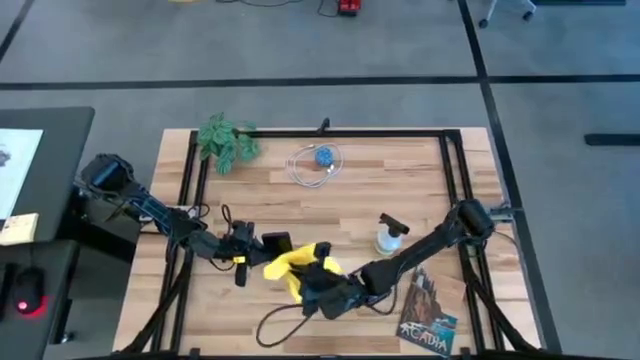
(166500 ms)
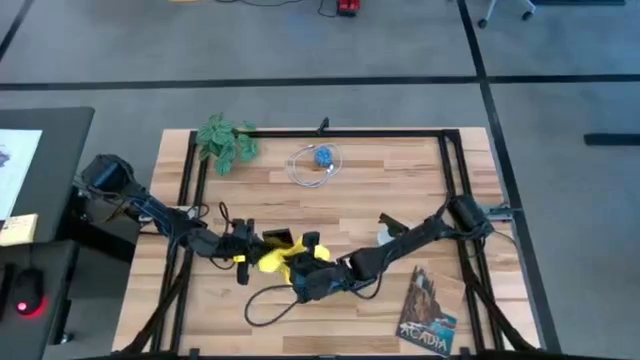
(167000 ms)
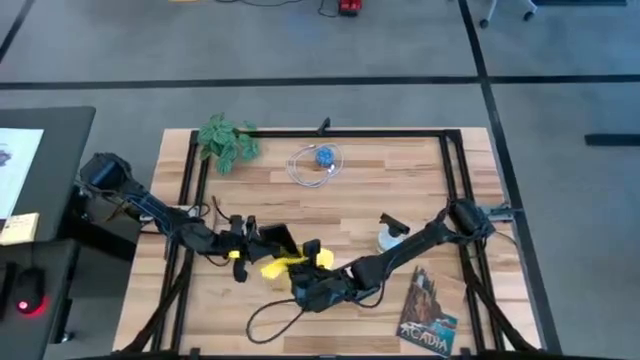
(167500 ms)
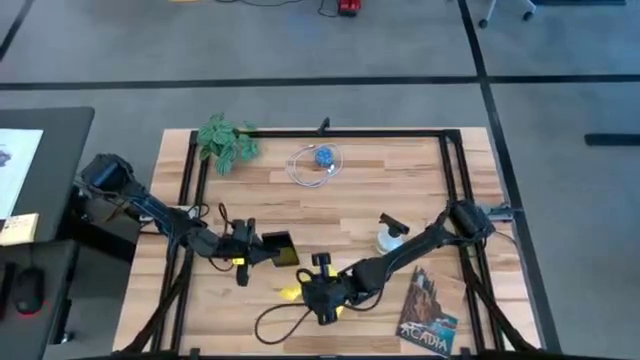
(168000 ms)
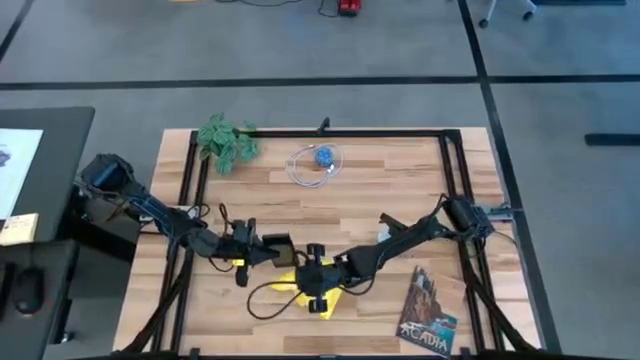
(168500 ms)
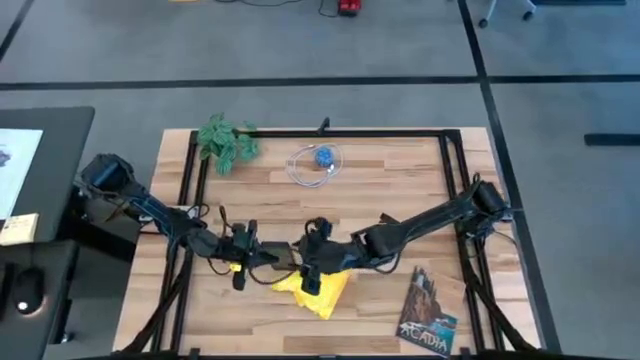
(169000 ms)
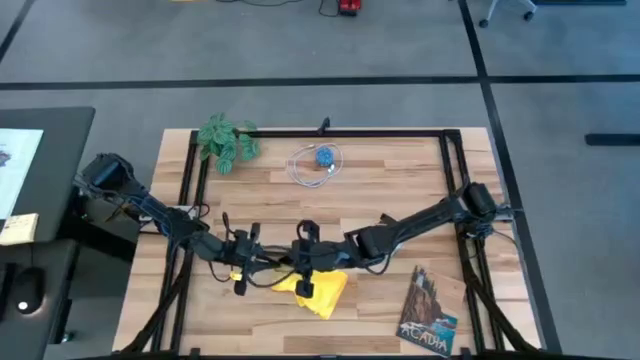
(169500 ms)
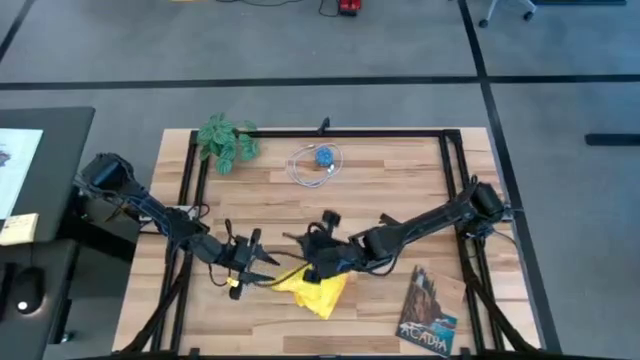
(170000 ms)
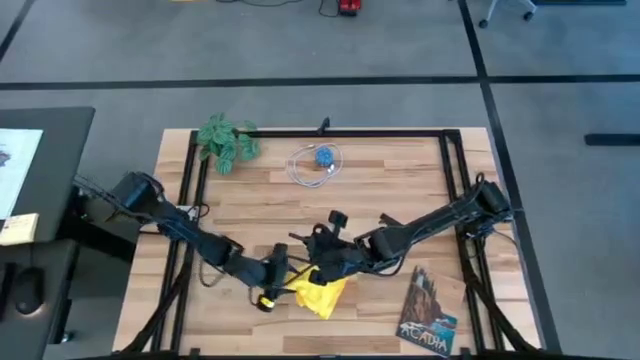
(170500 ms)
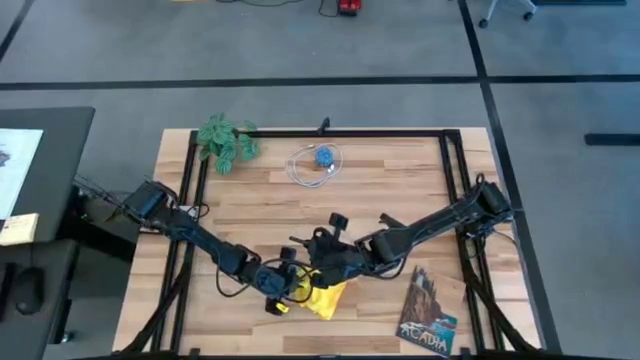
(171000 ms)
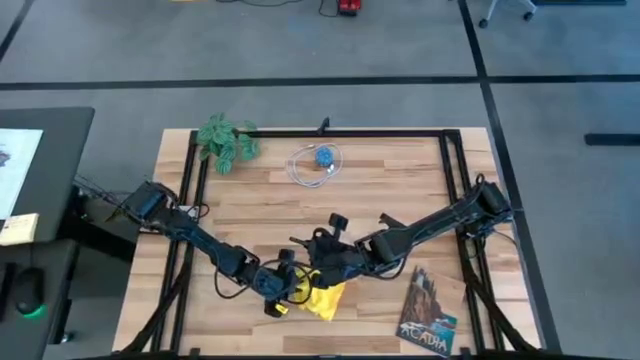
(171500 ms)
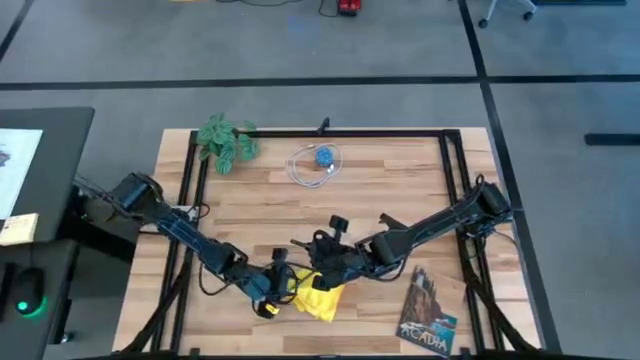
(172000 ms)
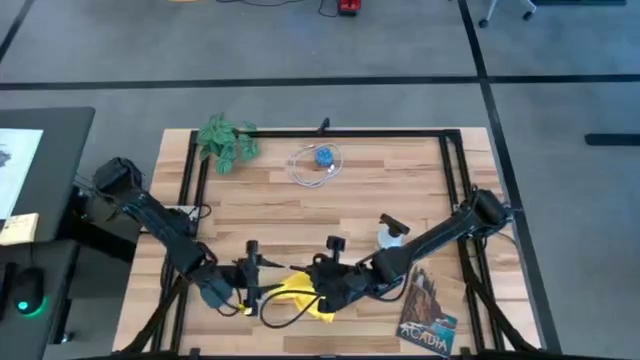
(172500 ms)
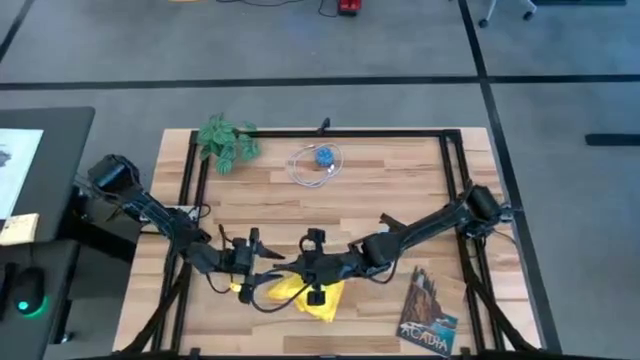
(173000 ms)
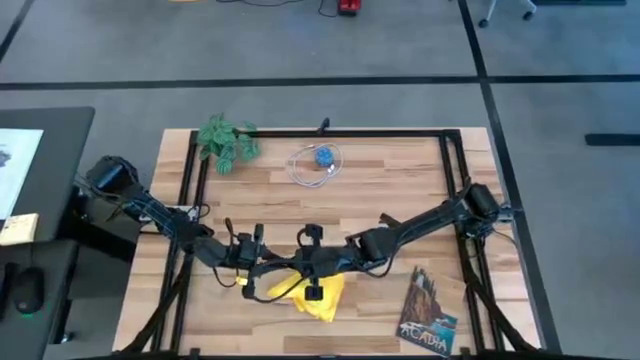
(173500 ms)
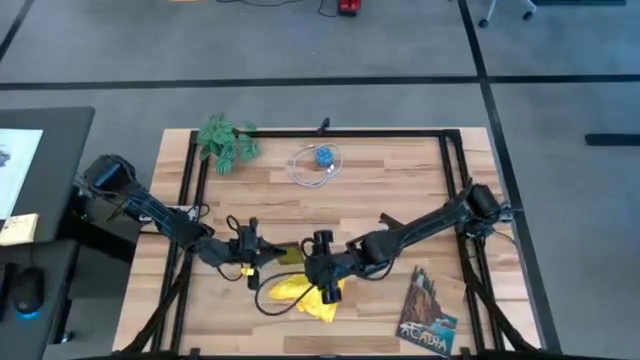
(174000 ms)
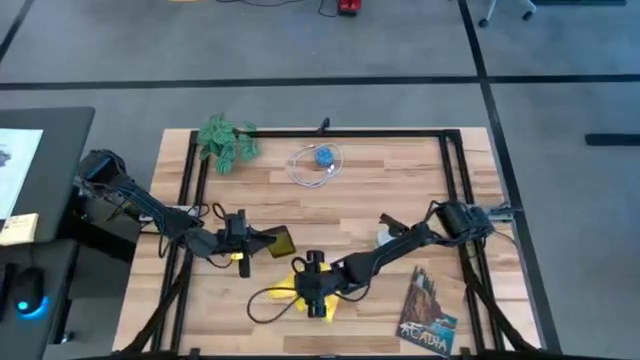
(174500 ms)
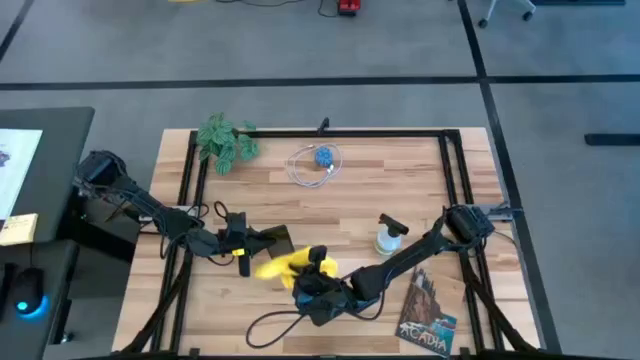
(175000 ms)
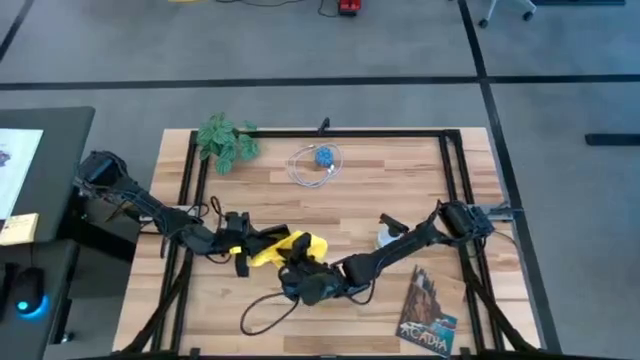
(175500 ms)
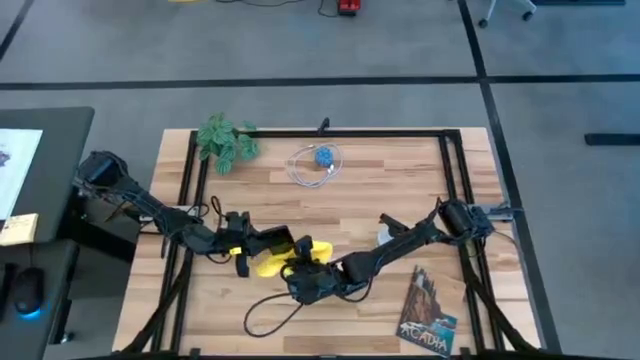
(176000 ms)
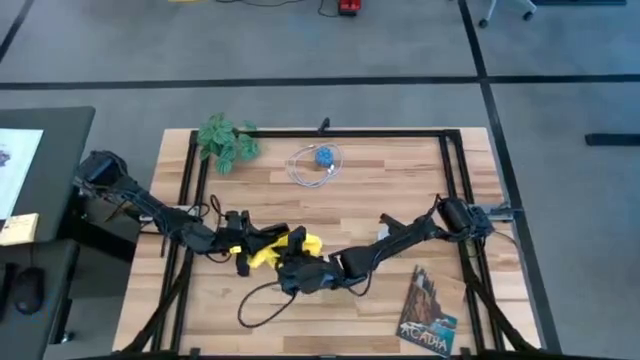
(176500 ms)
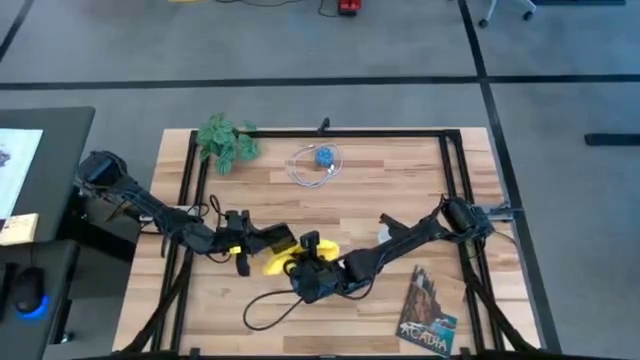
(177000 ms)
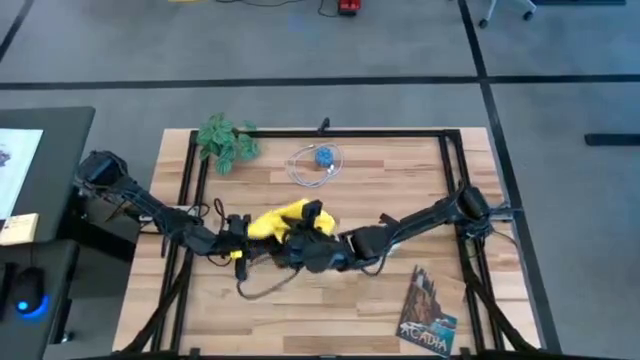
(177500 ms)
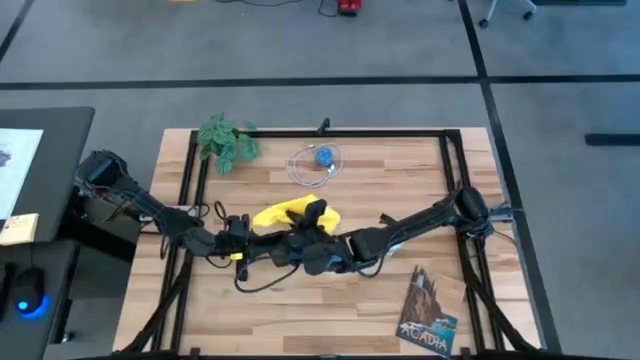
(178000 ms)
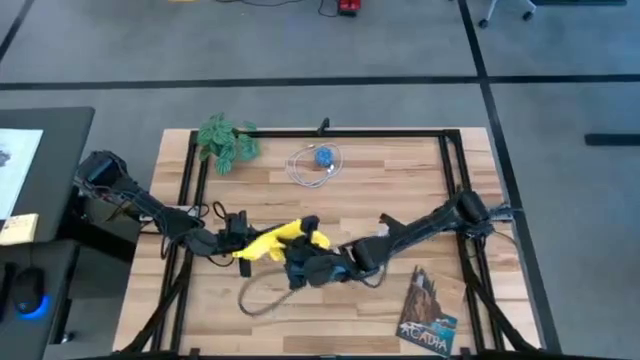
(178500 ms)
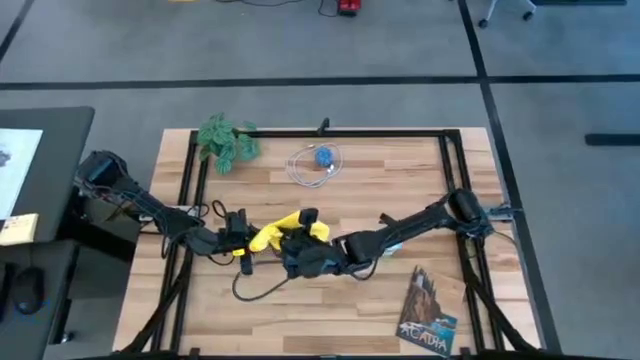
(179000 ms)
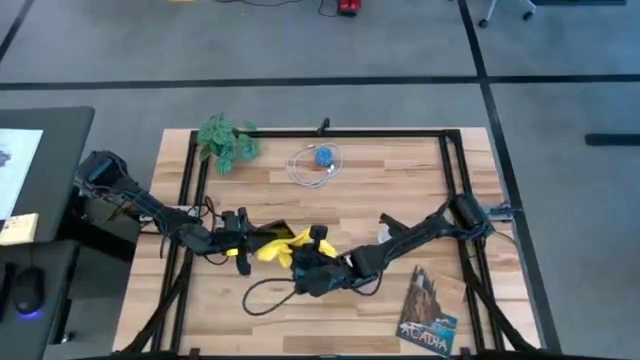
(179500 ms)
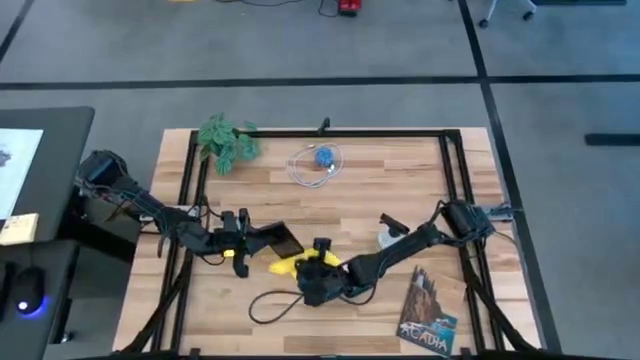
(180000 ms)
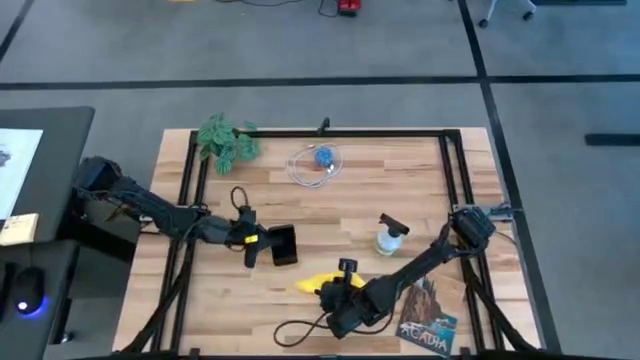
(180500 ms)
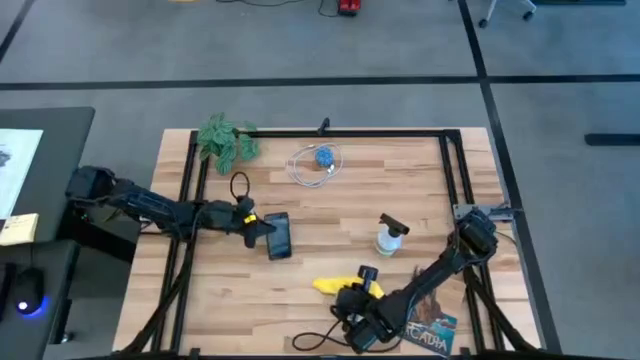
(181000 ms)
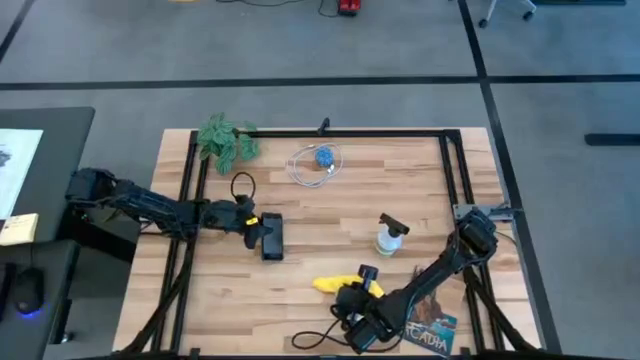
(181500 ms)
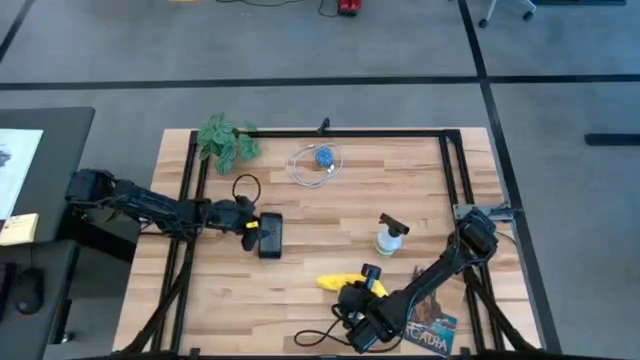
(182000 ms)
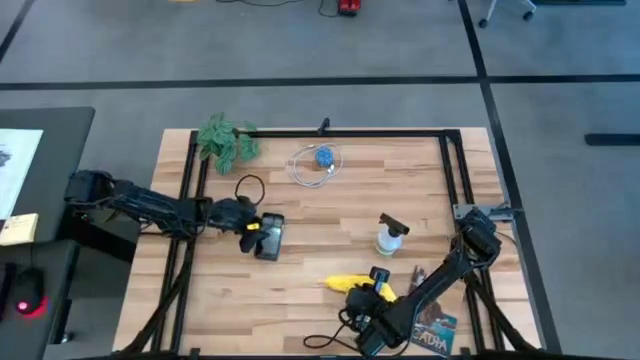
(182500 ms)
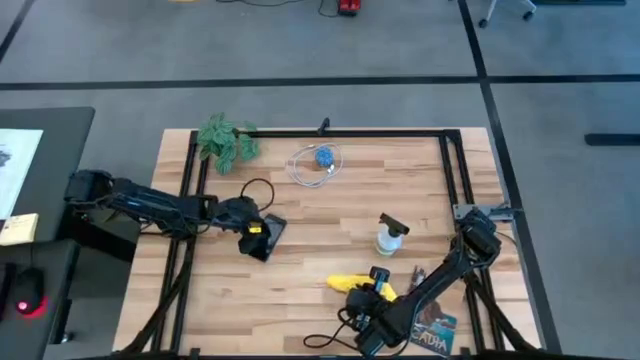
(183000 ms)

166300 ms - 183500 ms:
Task: Apply microfiber cloth
Wipe the back of the cellphone using a microfiber cloth

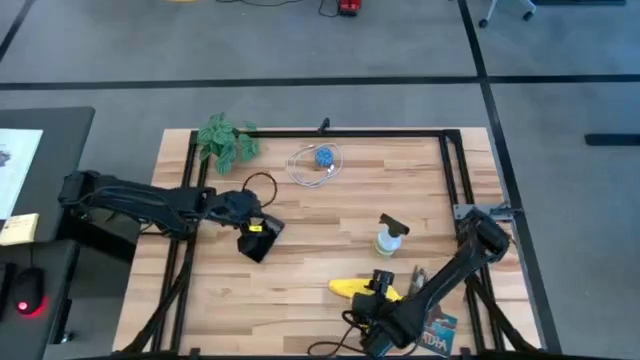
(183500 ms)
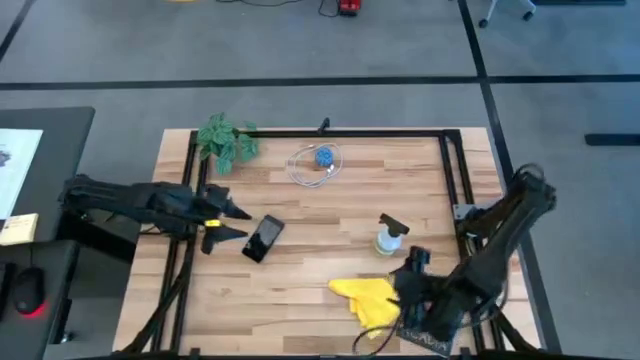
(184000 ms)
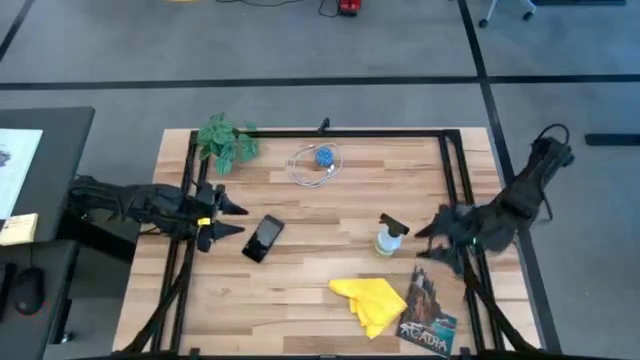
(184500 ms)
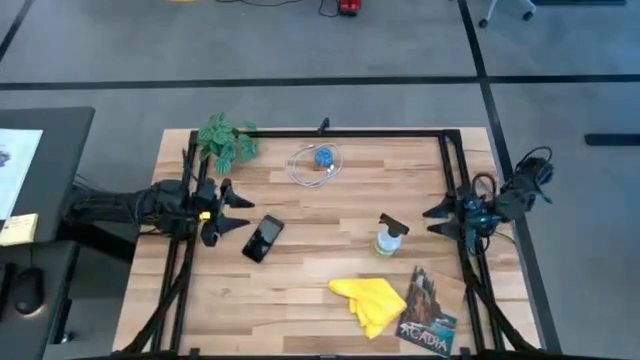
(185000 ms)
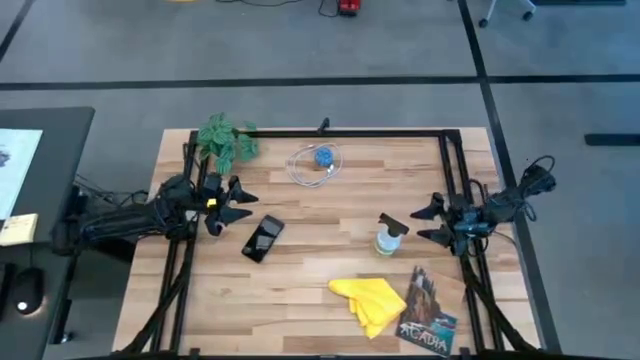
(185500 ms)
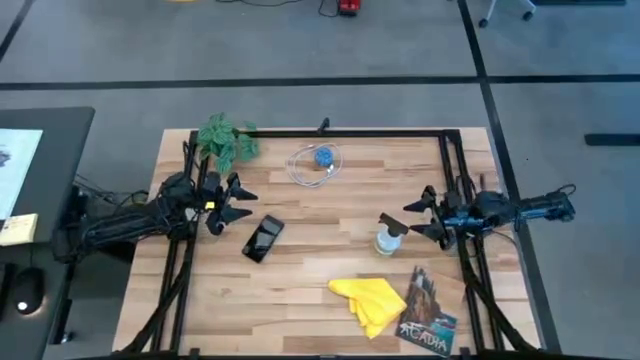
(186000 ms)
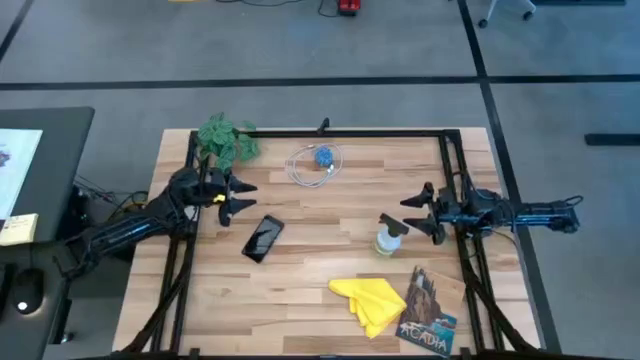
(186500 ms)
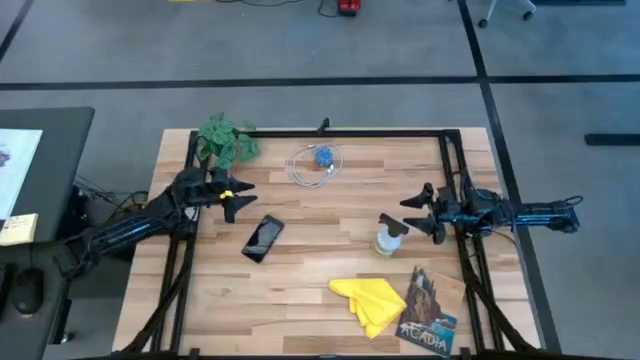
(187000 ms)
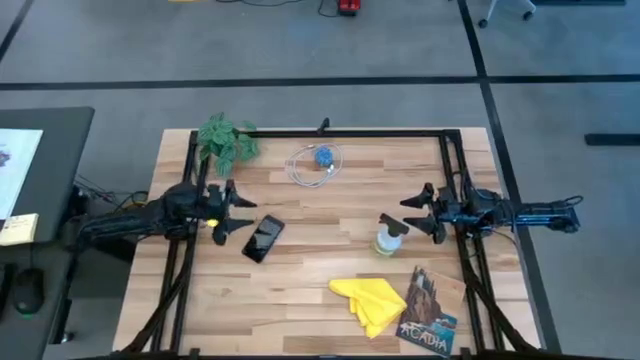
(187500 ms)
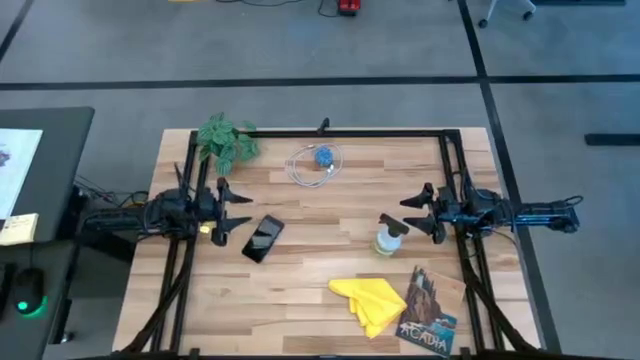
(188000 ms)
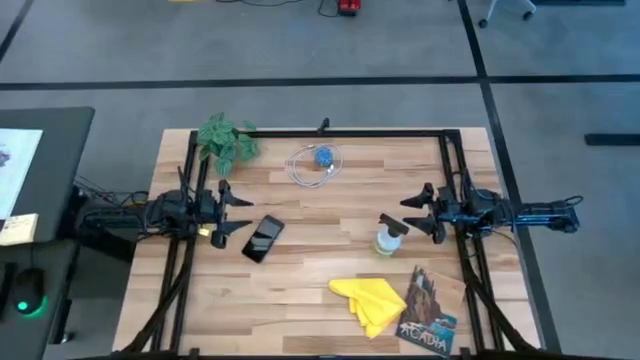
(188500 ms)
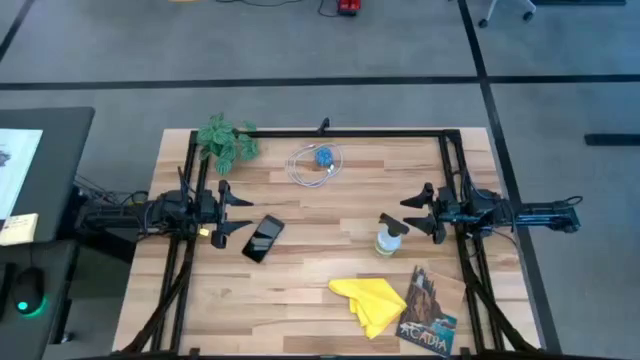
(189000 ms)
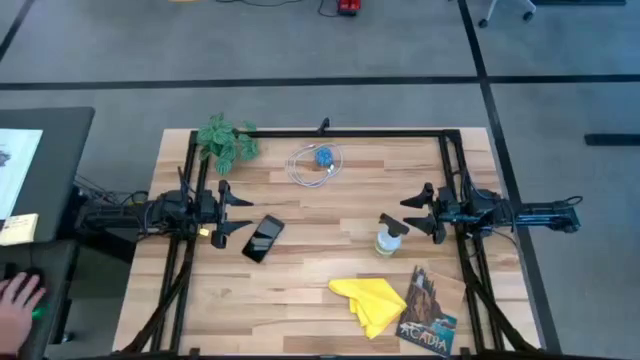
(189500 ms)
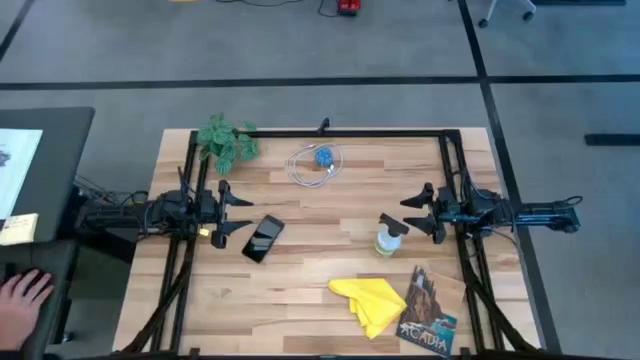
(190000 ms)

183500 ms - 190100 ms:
Return to Home Position
